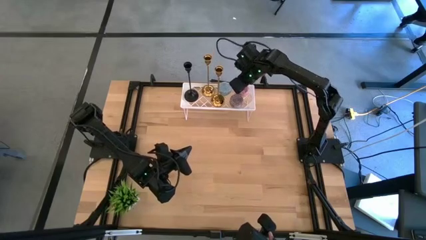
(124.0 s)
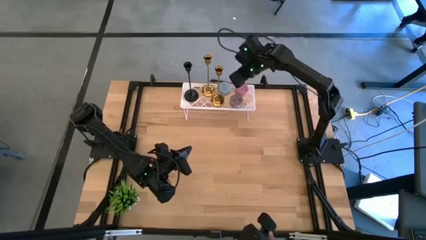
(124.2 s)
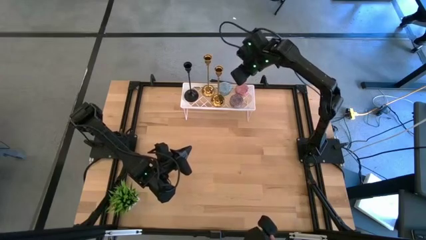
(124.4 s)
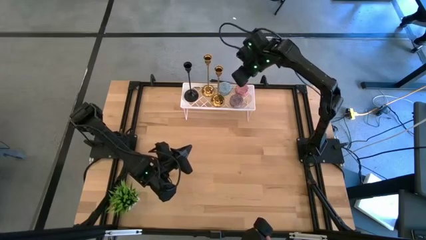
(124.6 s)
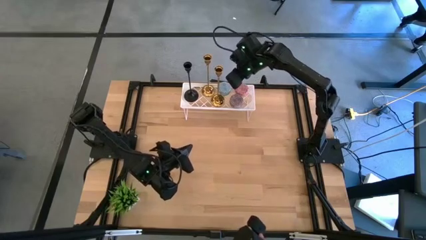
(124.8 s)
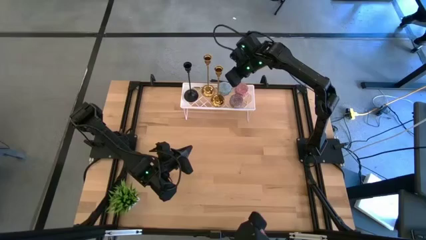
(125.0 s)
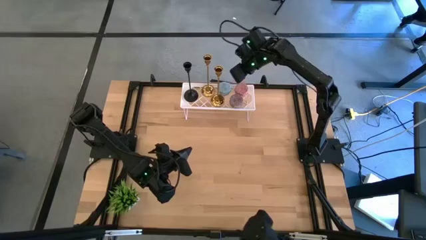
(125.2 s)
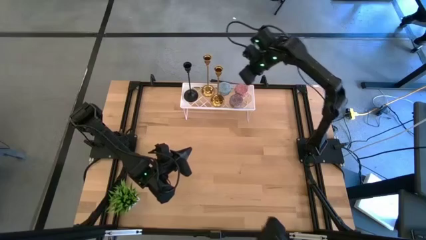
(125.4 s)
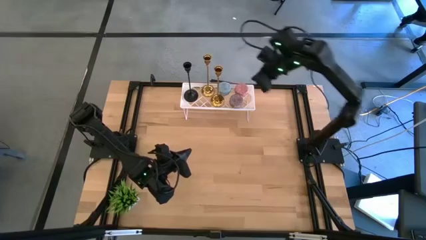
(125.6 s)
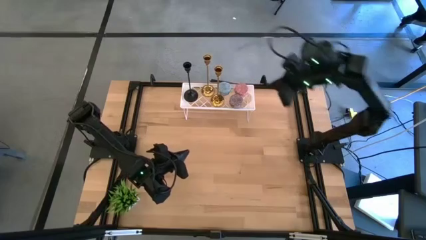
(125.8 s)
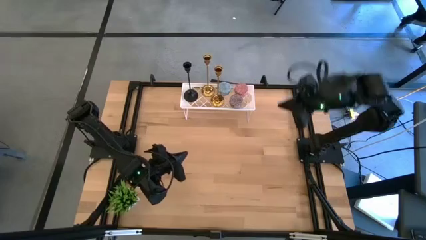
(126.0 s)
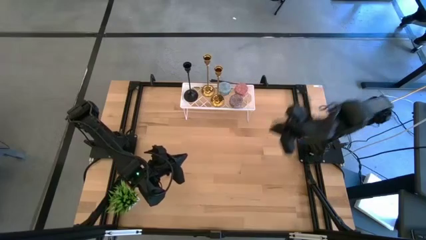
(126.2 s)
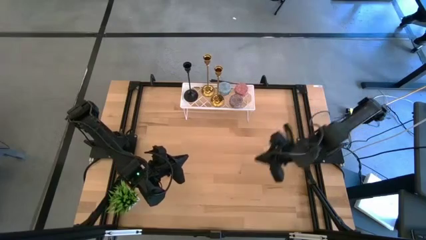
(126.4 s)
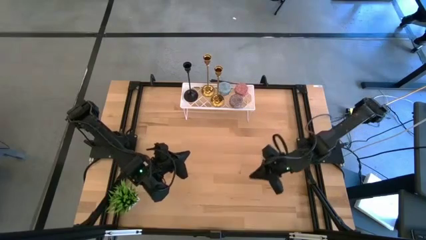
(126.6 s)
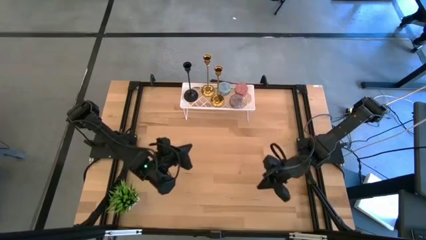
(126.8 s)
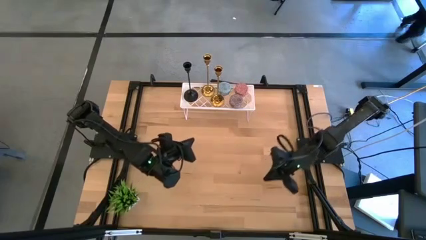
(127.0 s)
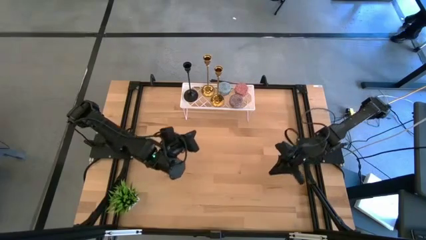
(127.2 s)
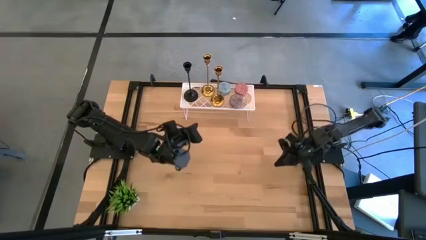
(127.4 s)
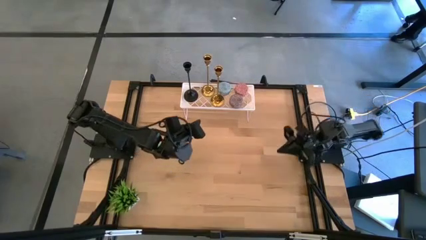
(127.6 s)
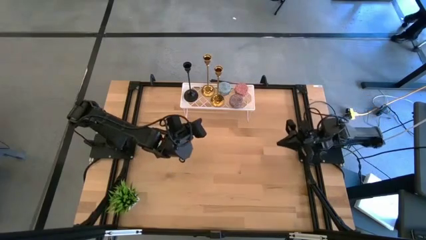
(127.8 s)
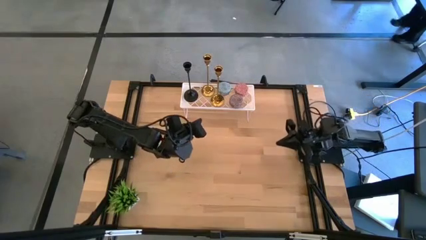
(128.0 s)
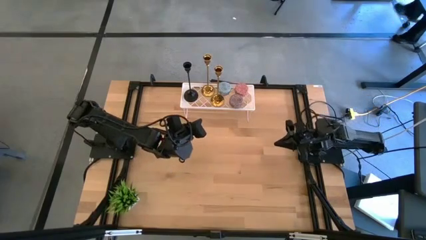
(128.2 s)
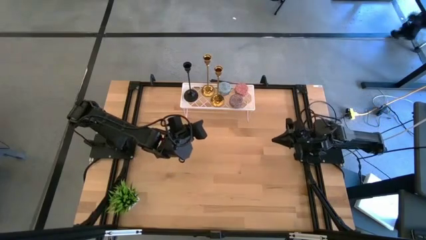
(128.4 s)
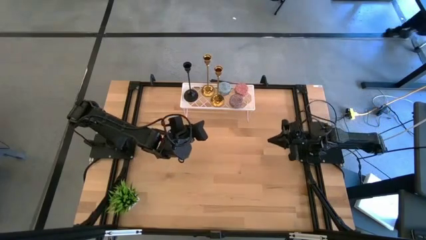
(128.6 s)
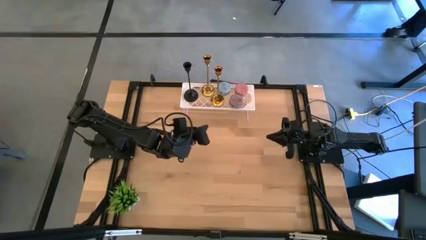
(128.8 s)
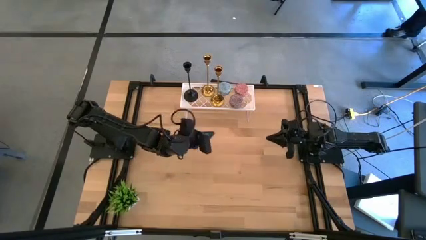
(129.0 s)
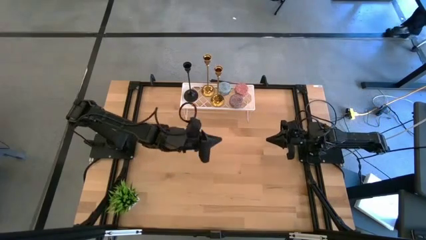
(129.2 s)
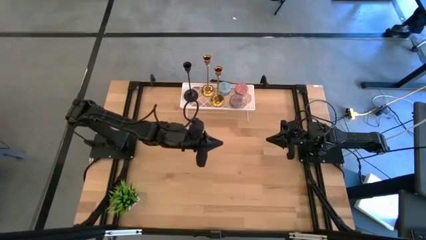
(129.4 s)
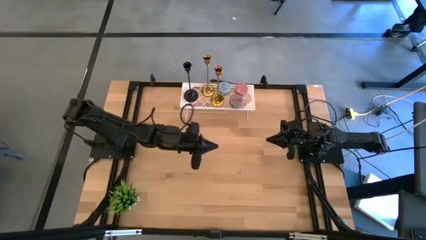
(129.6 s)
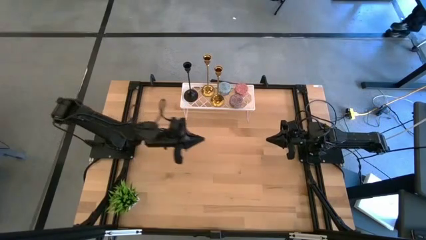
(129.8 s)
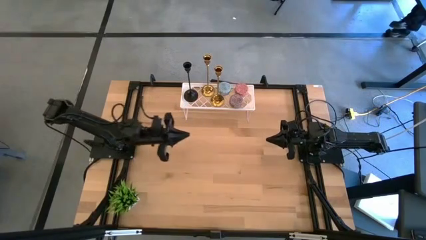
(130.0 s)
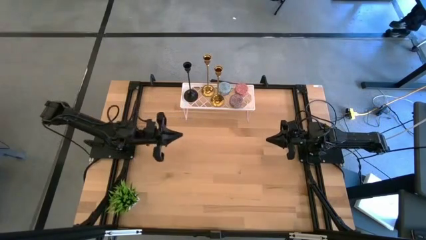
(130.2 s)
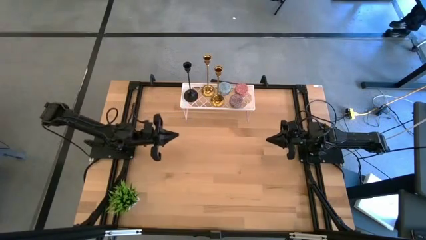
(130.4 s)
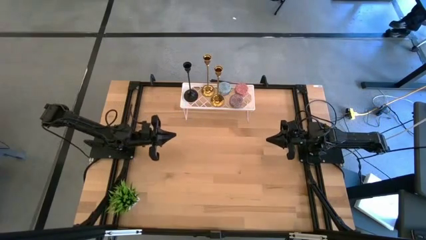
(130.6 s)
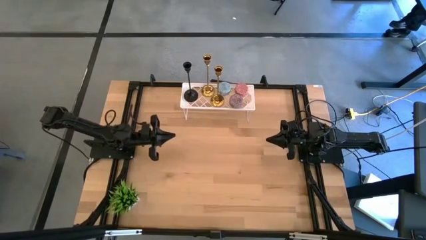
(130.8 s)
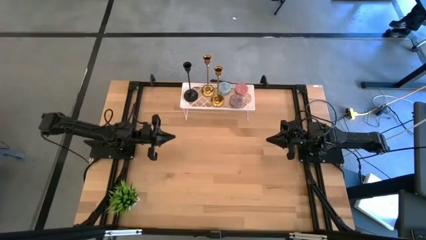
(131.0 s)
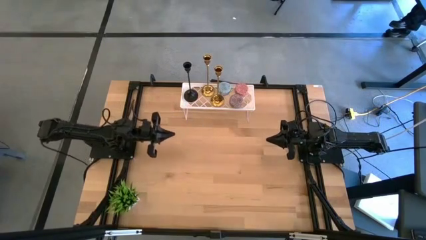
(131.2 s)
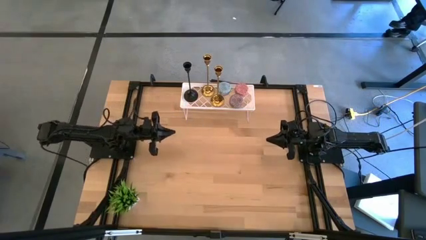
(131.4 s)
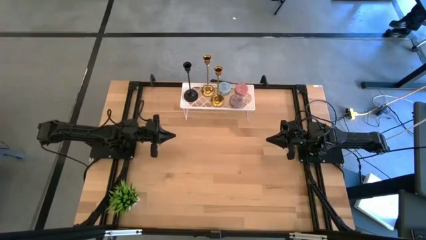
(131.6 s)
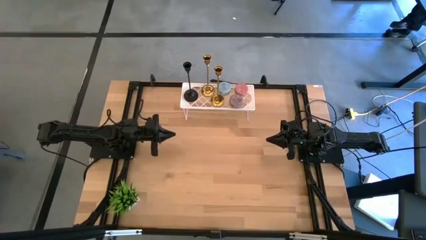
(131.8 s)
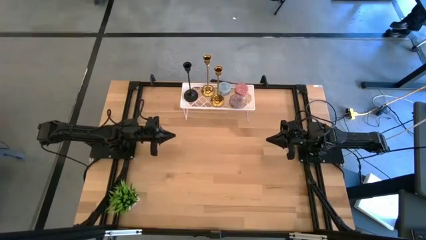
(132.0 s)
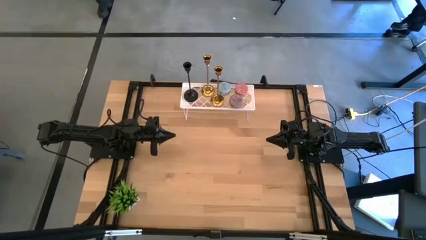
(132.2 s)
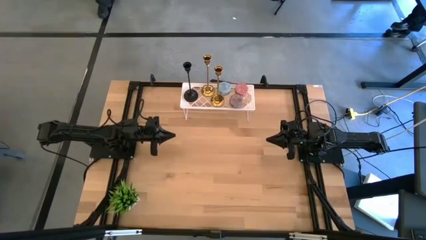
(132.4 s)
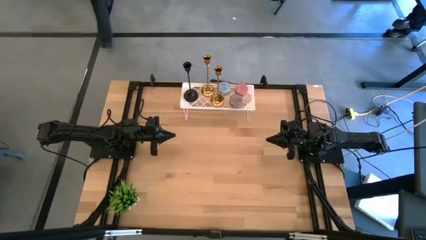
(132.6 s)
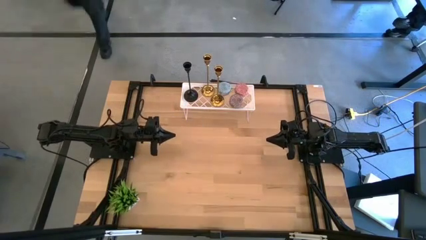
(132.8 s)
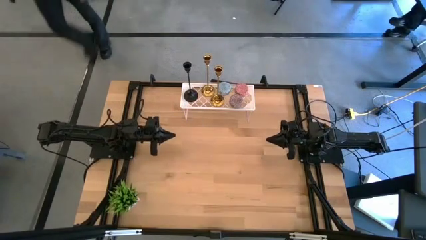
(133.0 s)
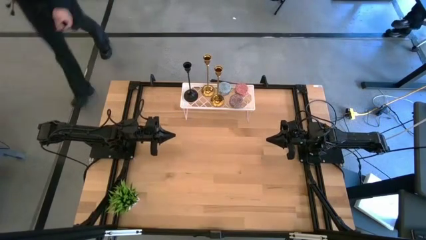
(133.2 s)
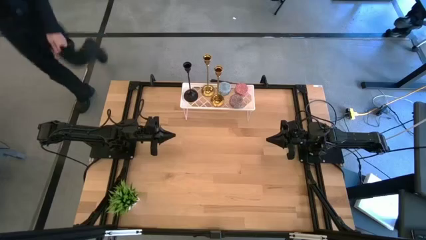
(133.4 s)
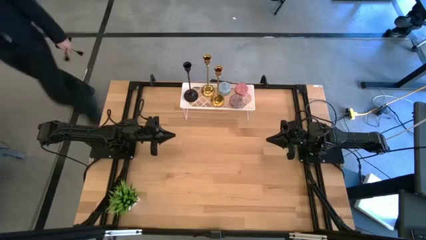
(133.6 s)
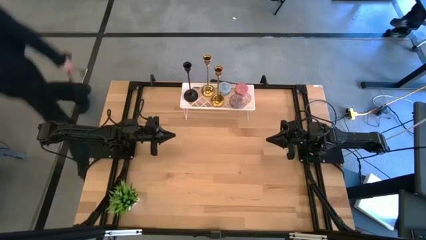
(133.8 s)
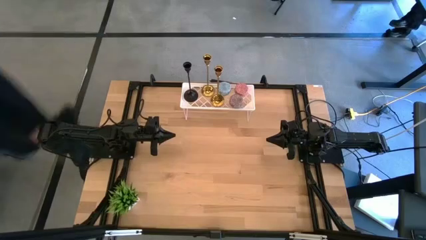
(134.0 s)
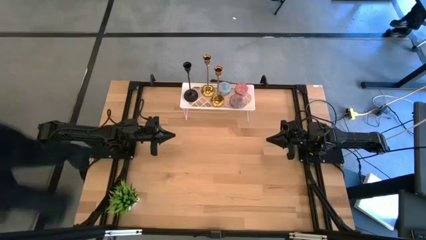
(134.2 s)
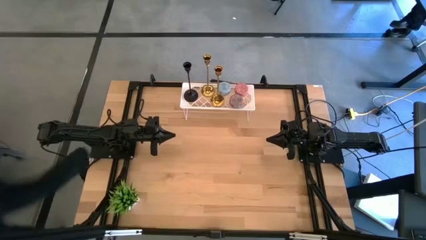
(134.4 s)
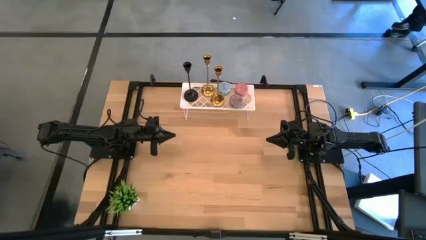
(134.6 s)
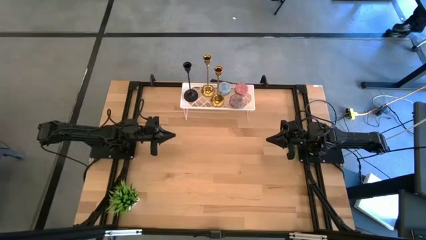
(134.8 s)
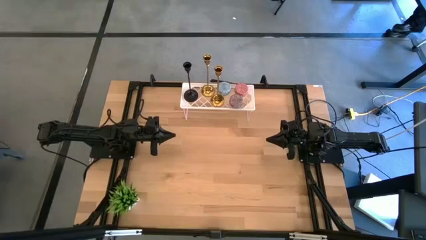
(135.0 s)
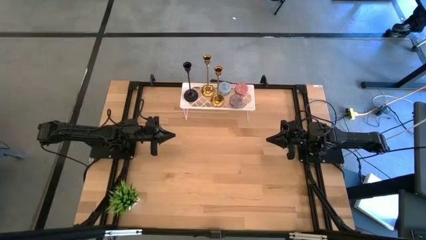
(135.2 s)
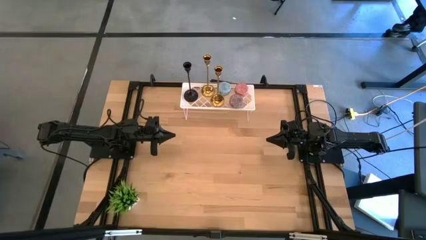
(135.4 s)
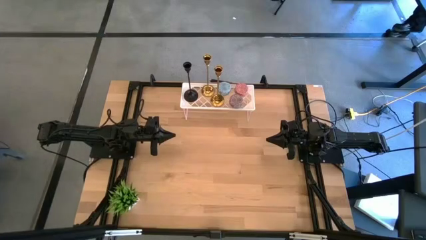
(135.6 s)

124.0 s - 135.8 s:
Task: Pick & Place candle stick holders
Return to Home Position
